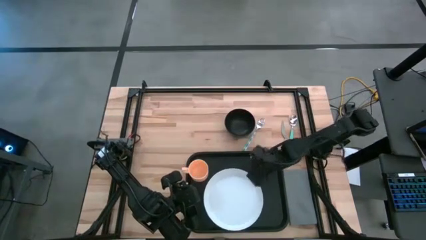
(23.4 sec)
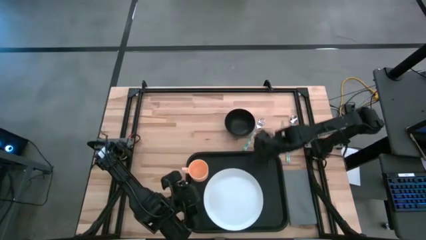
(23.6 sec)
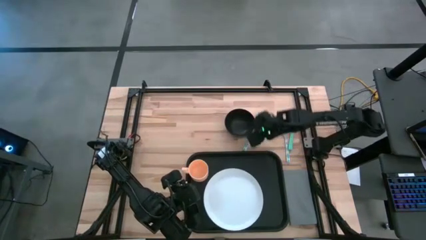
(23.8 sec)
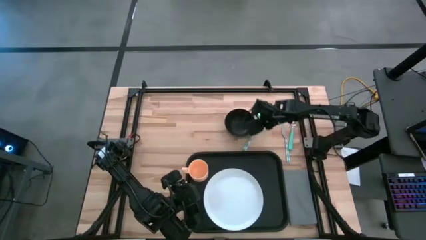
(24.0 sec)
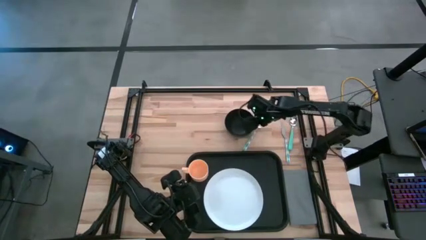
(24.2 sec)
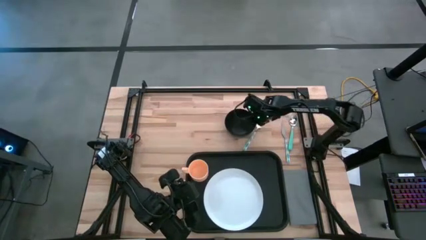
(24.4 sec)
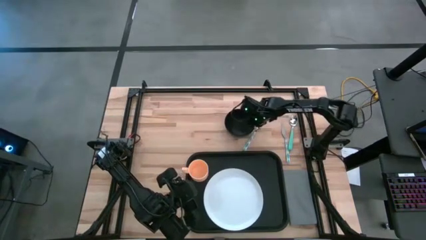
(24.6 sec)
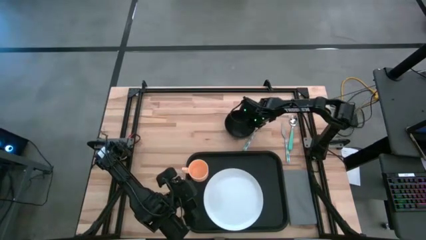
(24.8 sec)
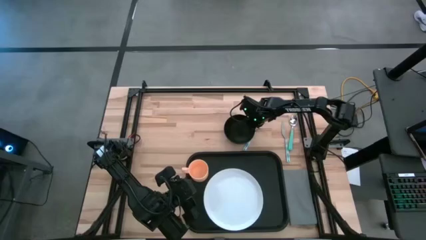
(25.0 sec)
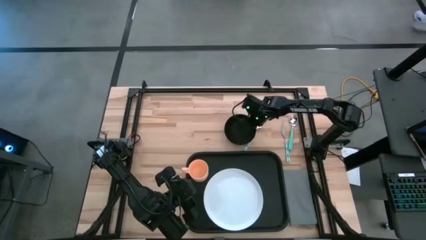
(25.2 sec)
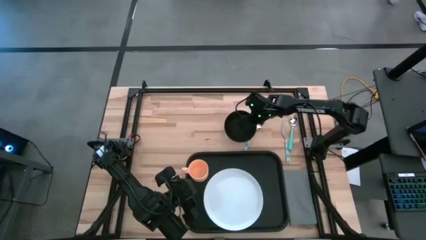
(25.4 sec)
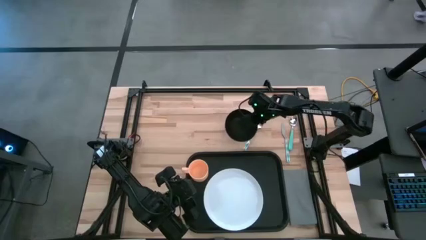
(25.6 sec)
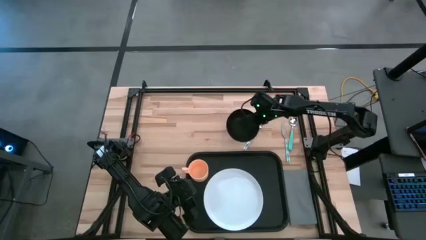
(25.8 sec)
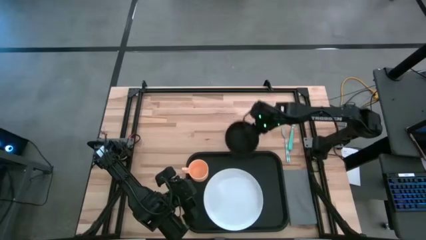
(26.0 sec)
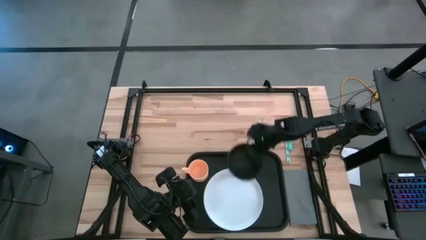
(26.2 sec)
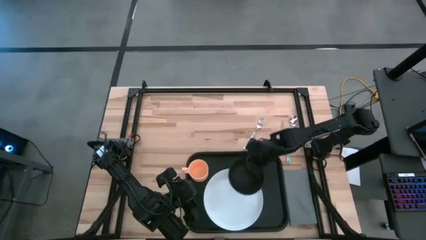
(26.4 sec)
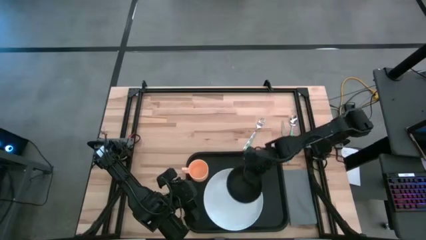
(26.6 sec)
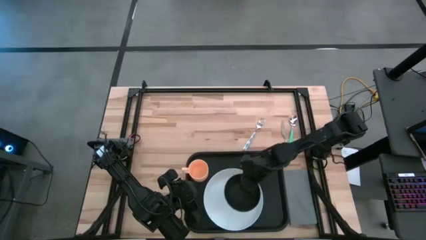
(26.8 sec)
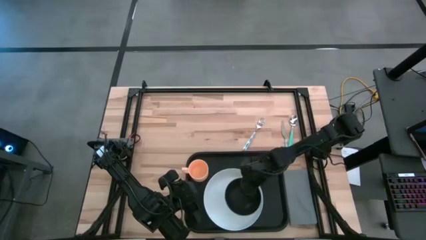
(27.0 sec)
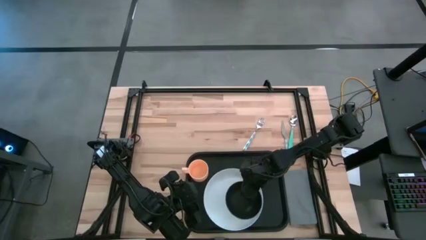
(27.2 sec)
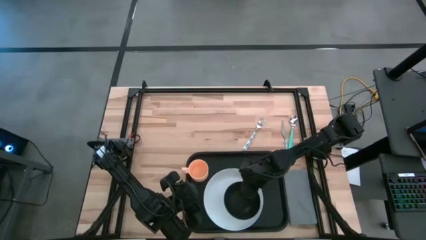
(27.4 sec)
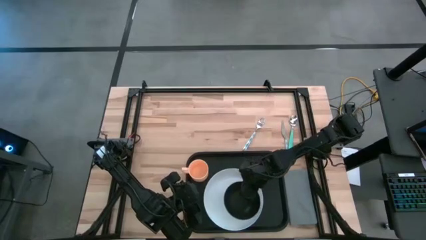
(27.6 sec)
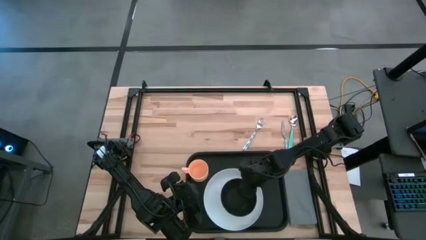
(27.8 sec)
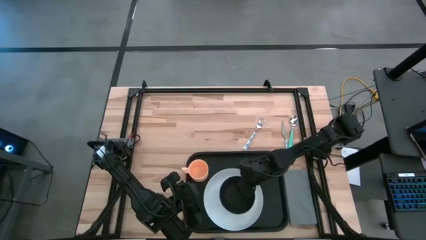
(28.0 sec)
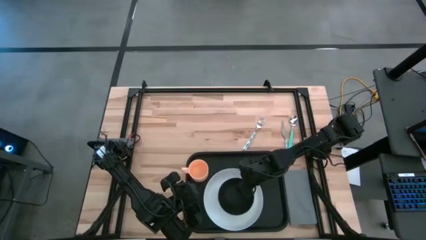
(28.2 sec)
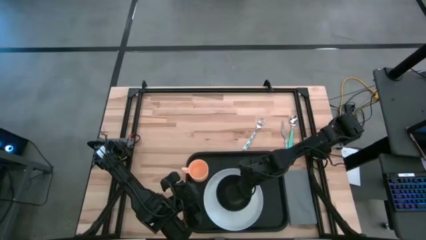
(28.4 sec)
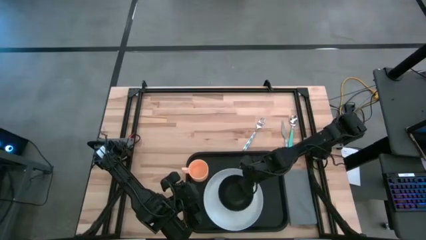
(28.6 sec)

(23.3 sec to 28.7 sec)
Task: Set up tray
Put the black bowl on top of the white plate on the black serving tray

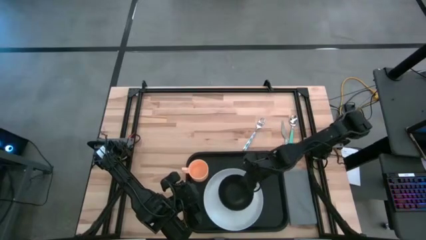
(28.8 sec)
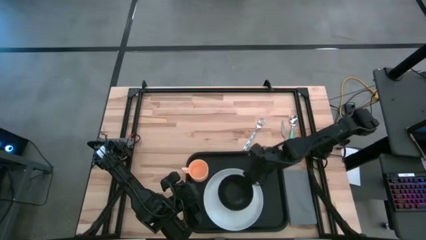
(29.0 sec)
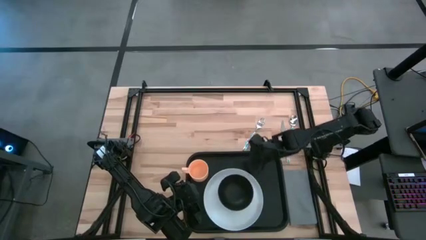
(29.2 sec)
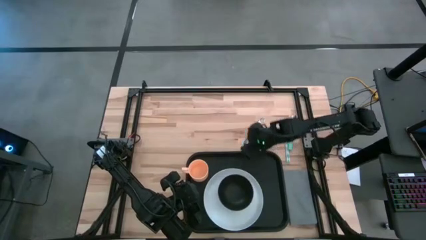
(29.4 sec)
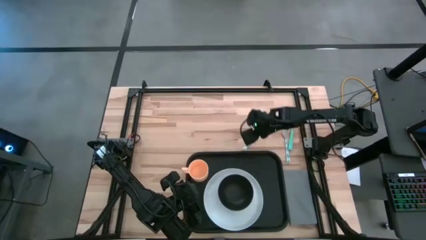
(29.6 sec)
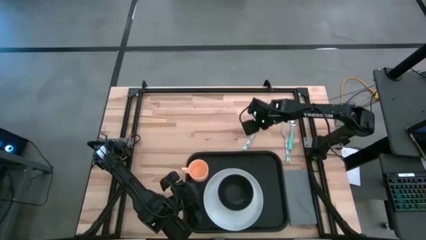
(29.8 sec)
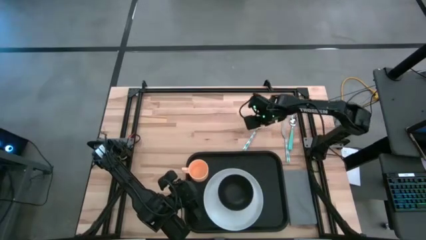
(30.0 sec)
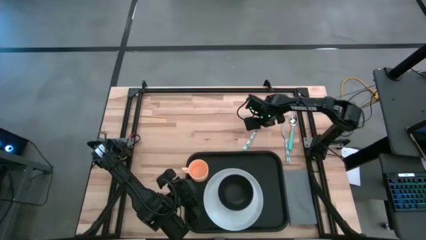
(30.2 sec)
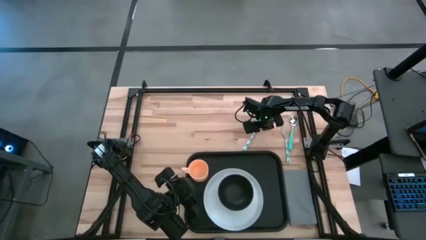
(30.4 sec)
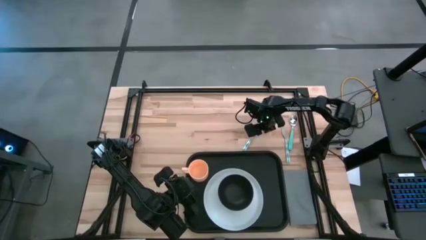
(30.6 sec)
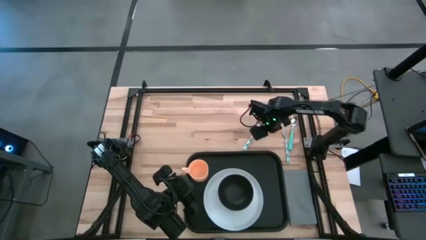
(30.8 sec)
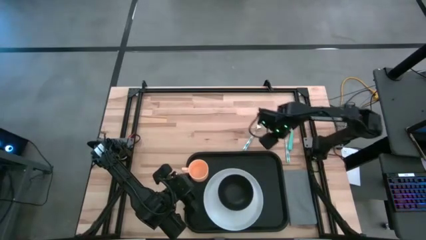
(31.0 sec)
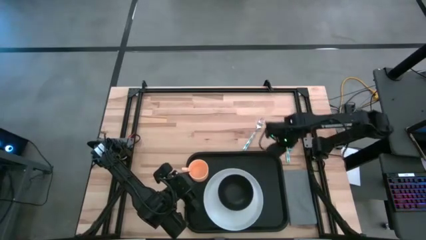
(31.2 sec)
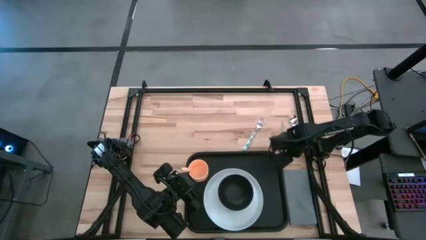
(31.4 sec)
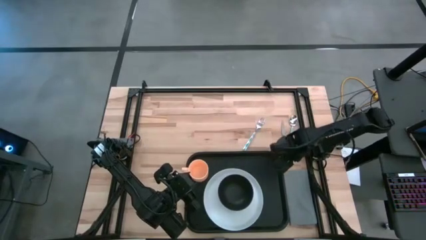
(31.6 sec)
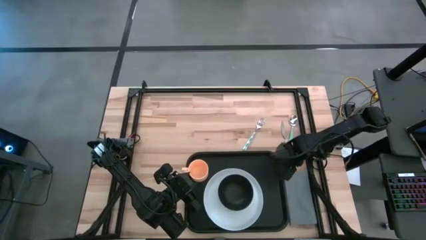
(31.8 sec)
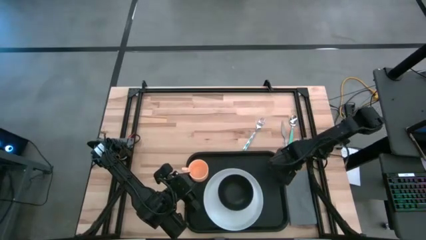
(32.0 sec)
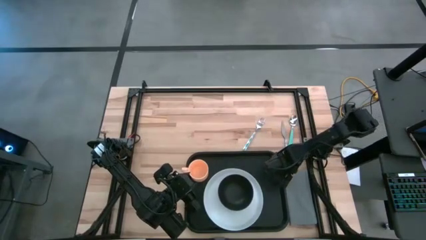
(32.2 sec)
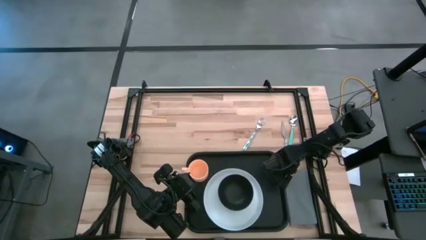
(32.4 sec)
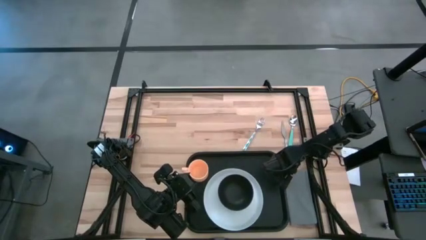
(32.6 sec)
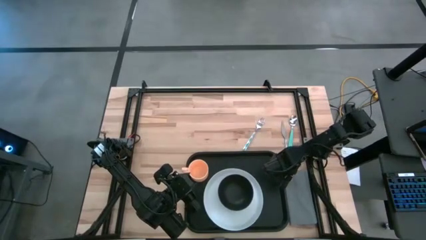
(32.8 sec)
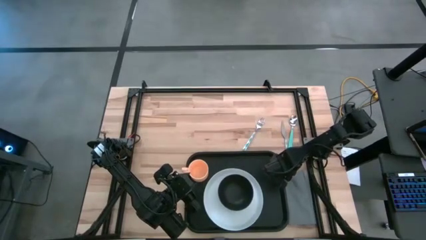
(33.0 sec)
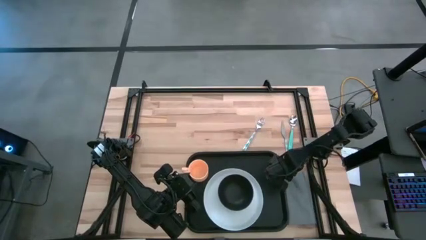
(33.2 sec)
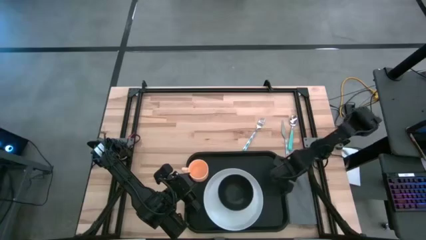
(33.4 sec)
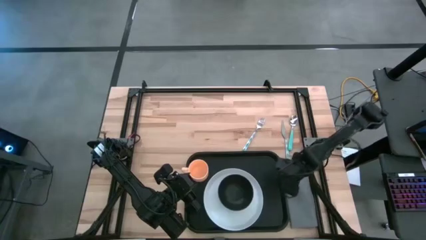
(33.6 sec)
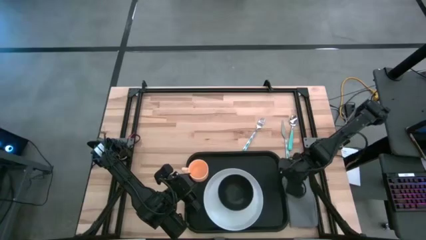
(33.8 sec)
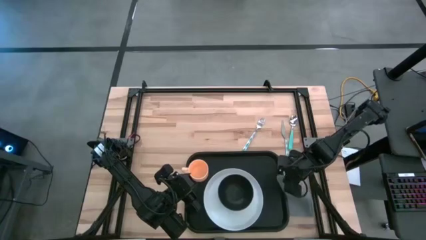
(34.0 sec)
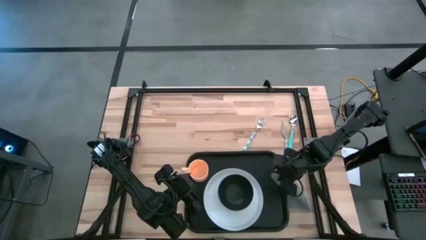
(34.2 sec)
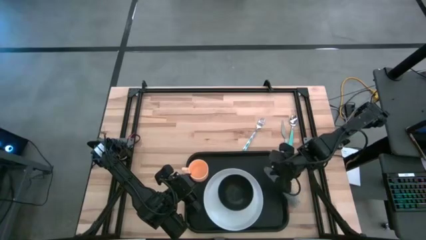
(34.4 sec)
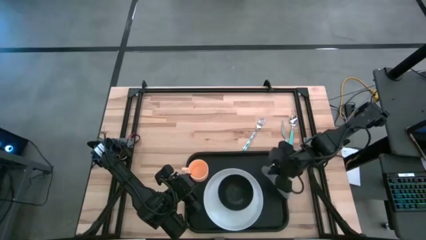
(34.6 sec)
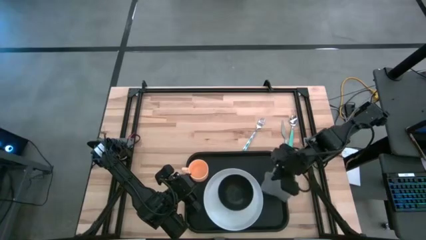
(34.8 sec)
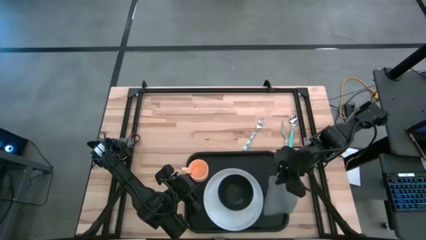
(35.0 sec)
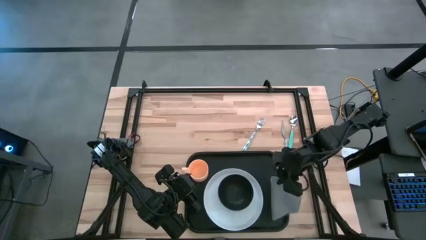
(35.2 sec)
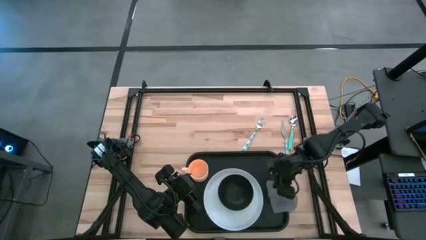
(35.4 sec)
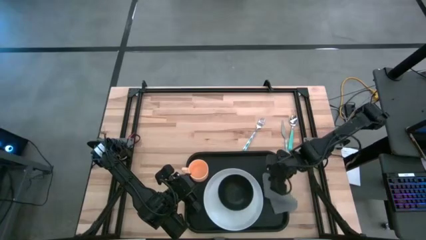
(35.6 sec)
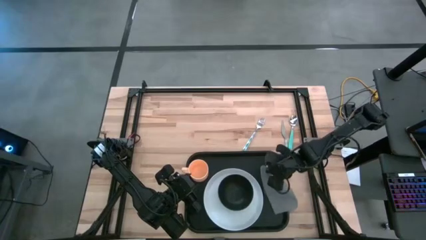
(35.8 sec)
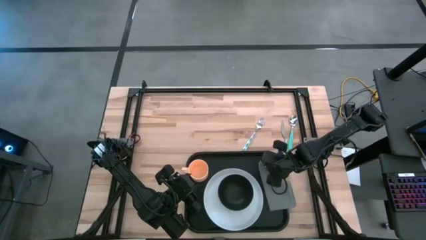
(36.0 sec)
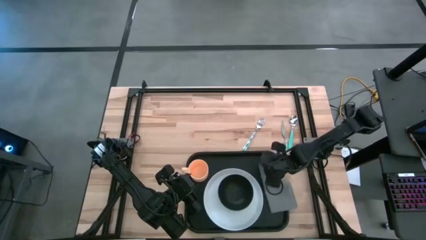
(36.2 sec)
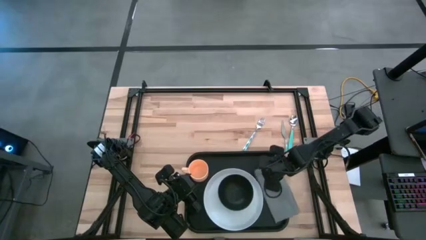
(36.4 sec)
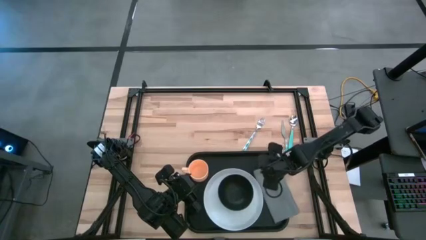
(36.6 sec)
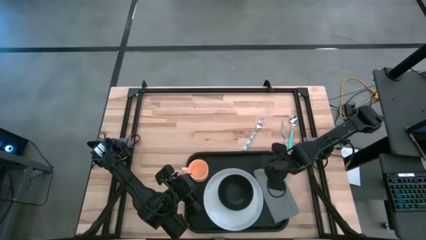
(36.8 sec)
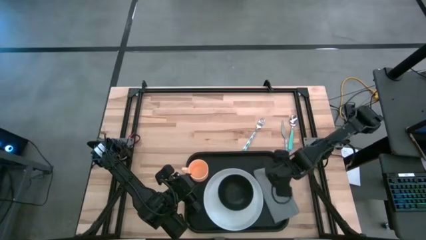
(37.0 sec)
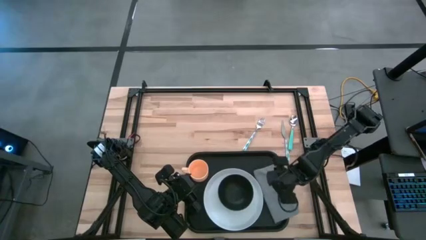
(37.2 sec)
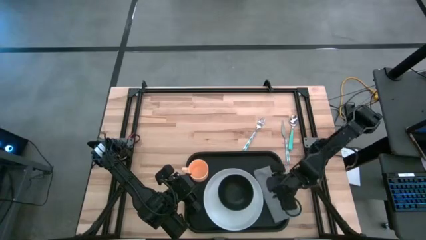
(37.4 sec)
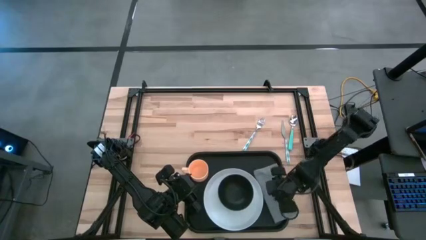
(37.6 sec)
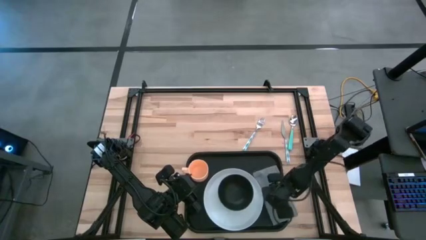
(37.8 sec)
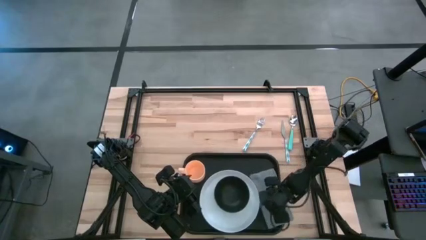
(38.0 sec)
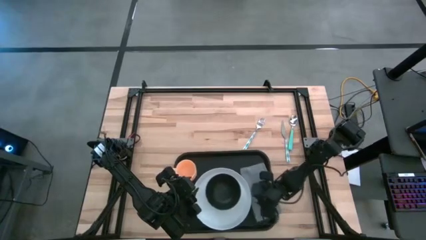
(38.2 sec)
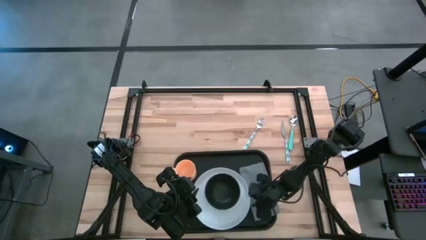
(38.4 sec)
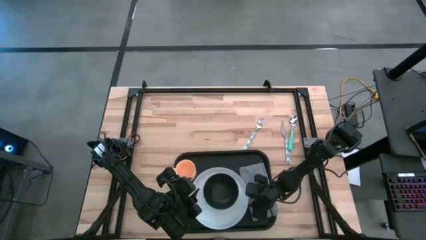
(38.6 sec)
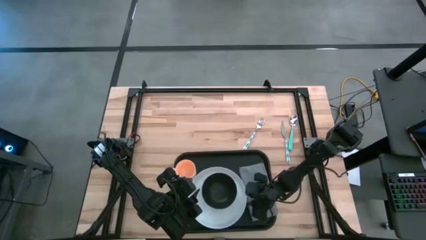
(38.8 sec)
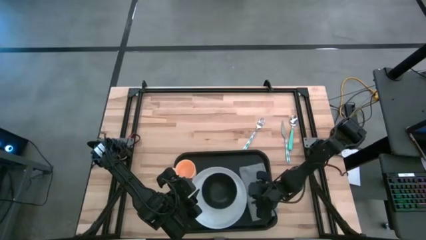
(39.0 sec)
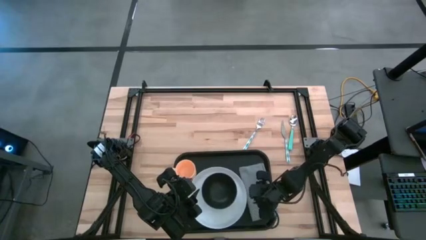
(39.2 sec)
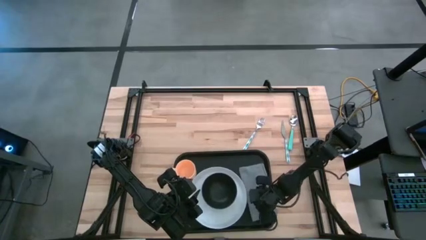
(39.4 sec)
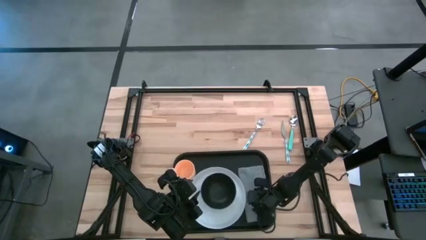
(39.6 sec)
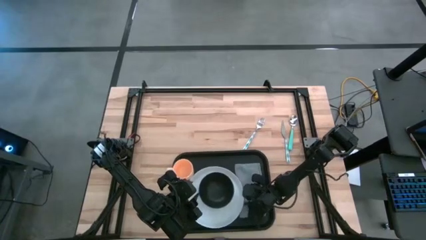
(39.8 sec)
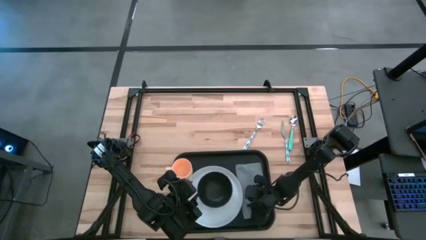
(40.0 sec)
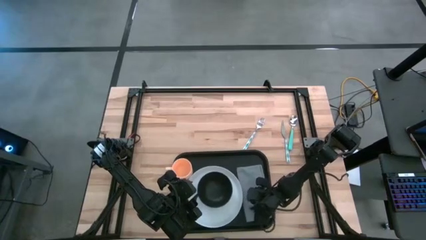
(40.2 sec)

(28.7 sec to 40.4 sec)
Put the gray napkin on the right of the white plate on the black serving tray
